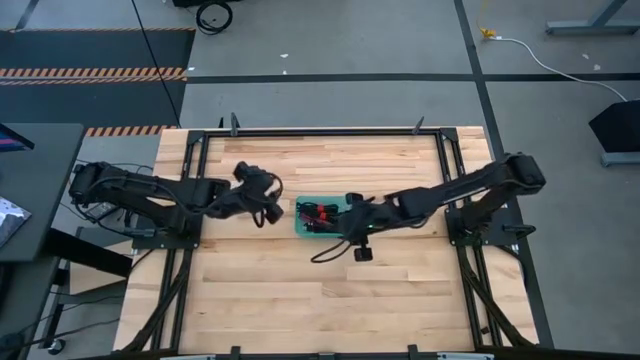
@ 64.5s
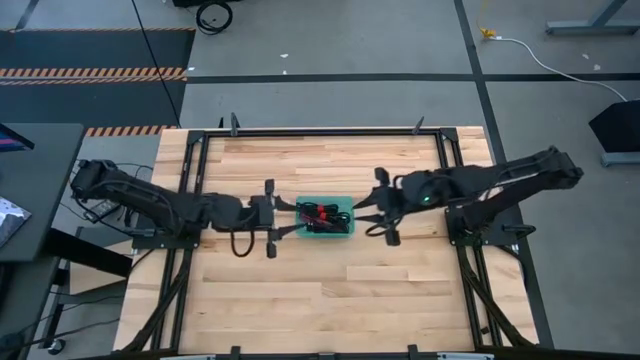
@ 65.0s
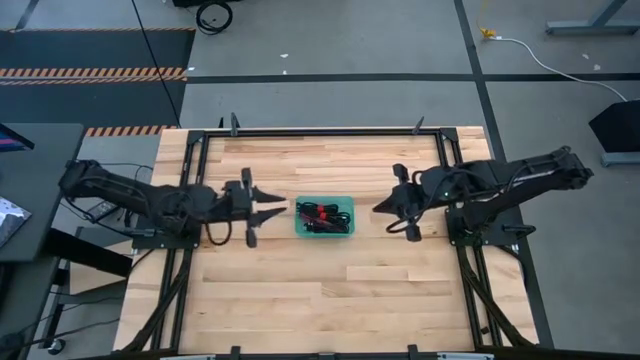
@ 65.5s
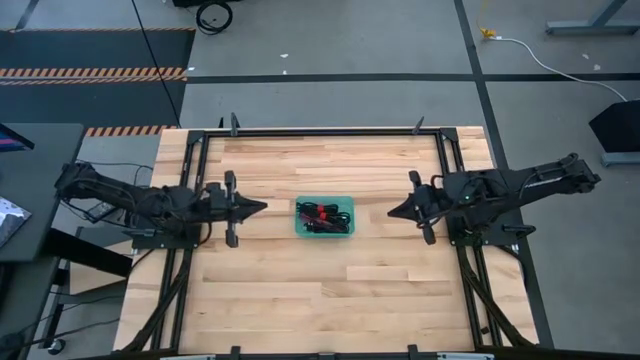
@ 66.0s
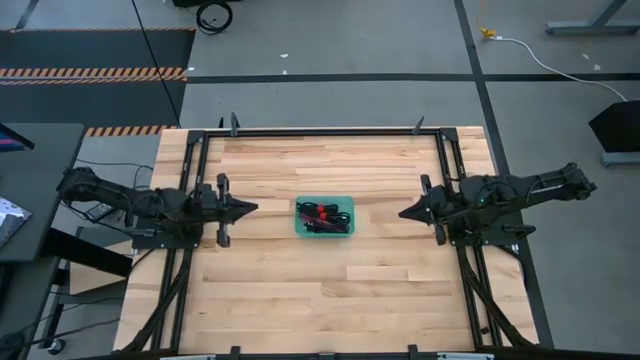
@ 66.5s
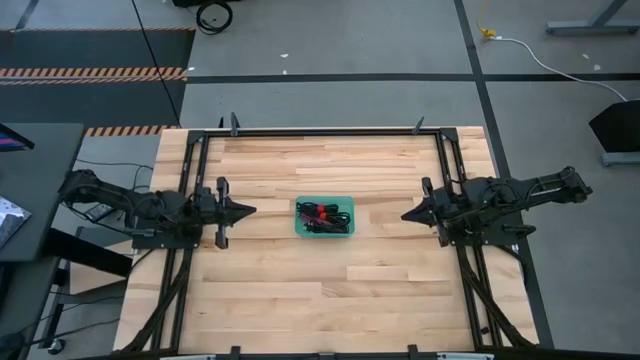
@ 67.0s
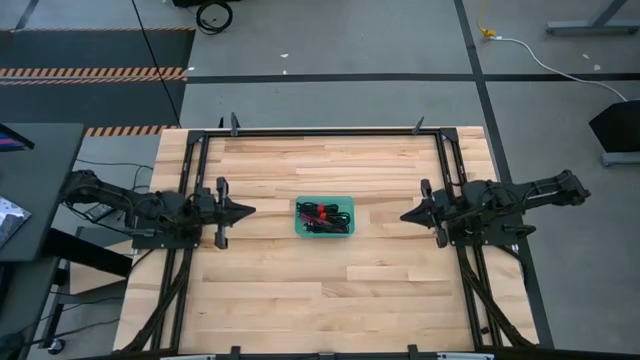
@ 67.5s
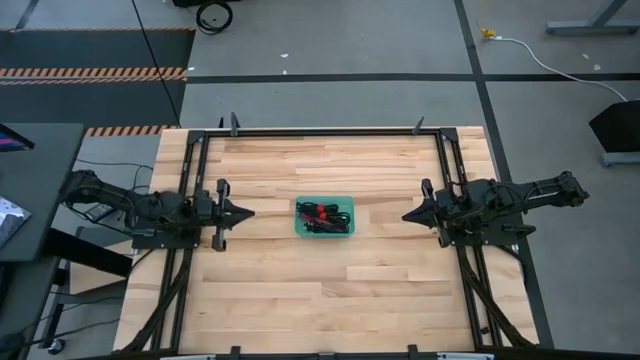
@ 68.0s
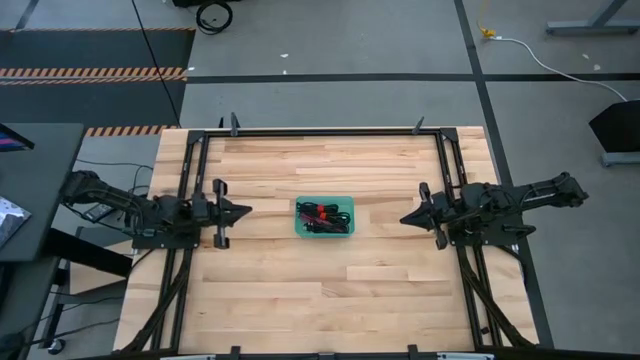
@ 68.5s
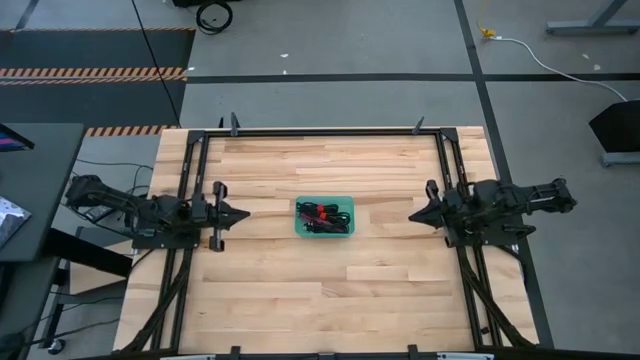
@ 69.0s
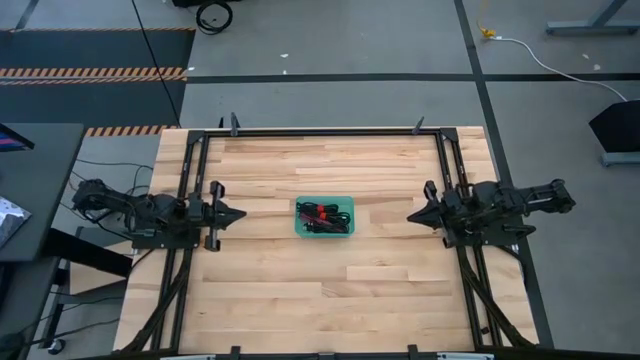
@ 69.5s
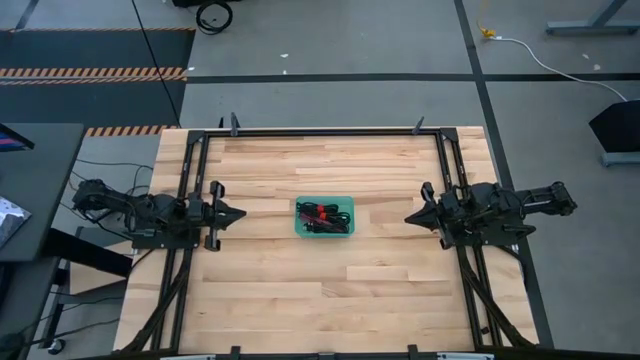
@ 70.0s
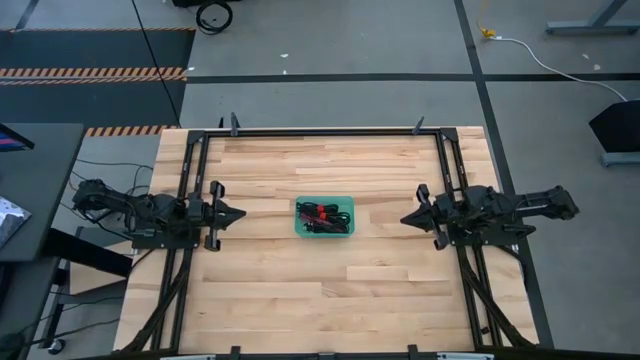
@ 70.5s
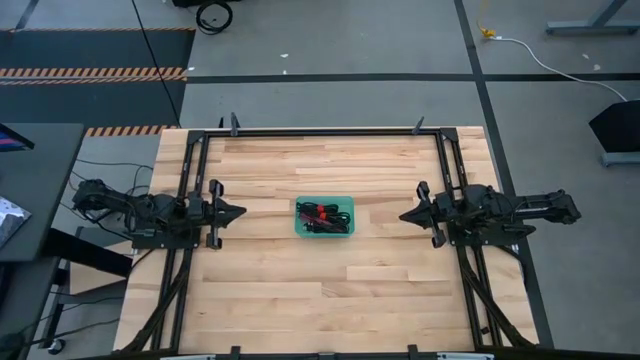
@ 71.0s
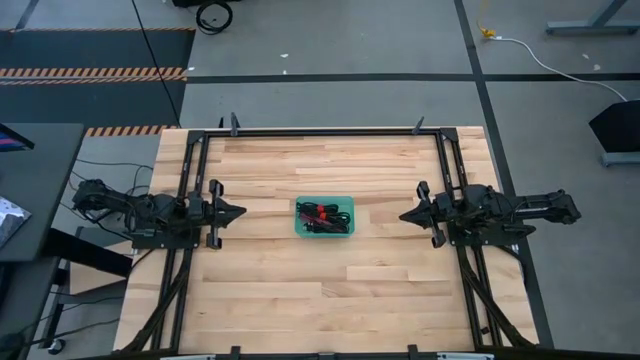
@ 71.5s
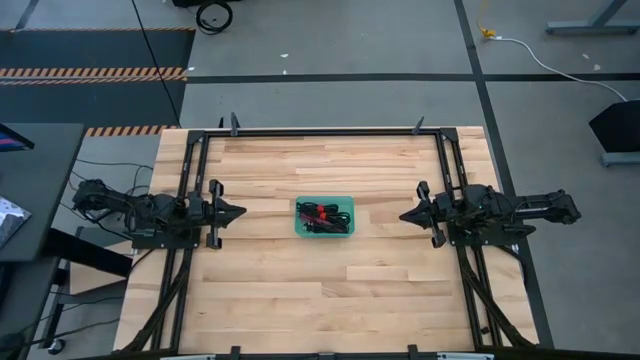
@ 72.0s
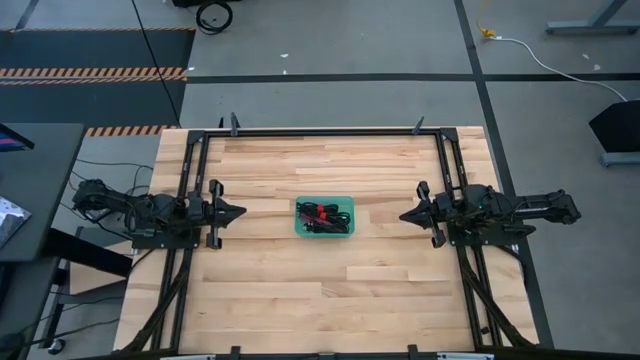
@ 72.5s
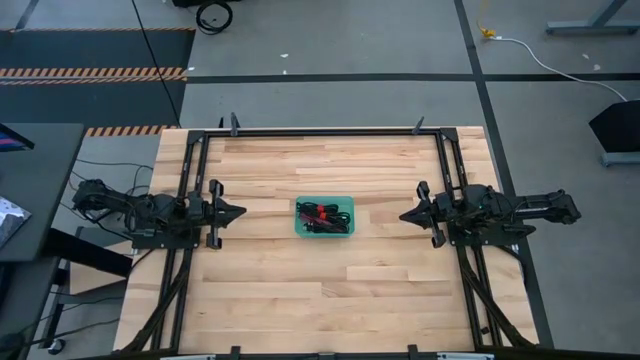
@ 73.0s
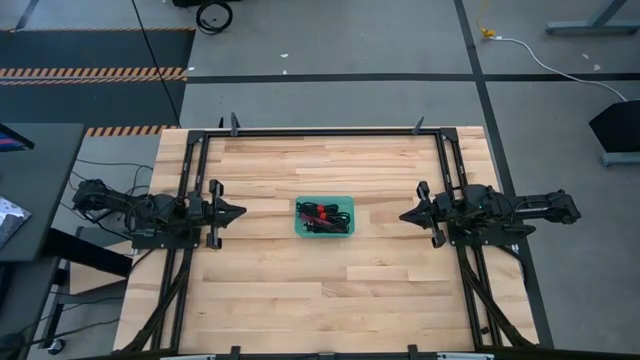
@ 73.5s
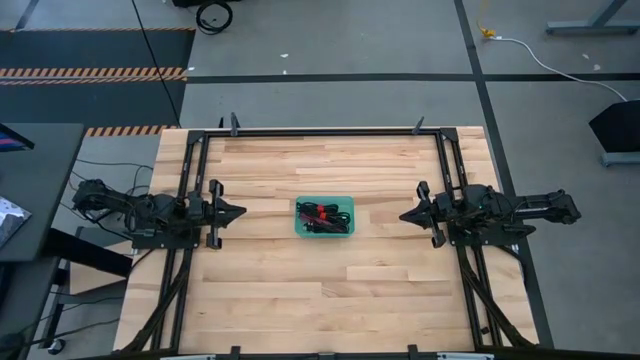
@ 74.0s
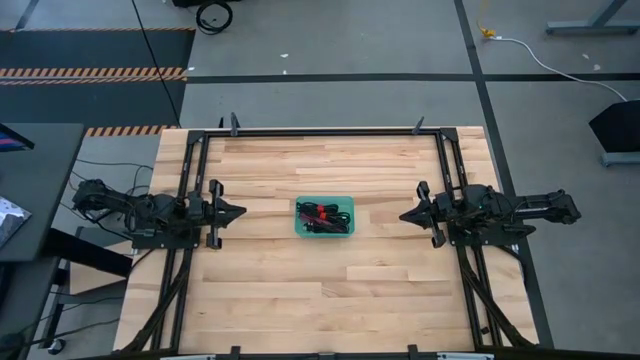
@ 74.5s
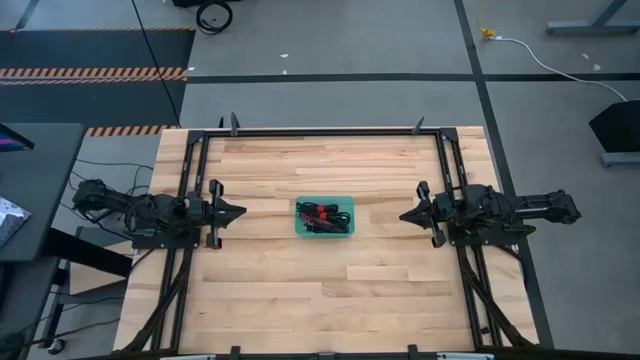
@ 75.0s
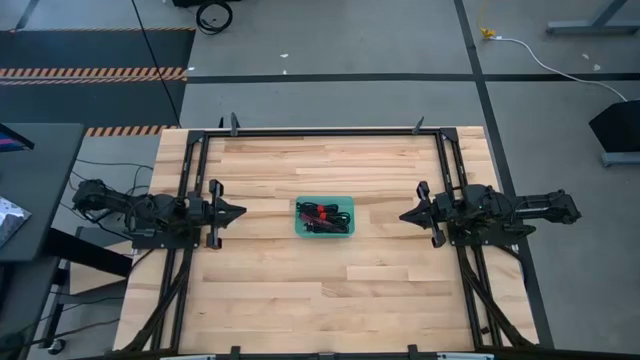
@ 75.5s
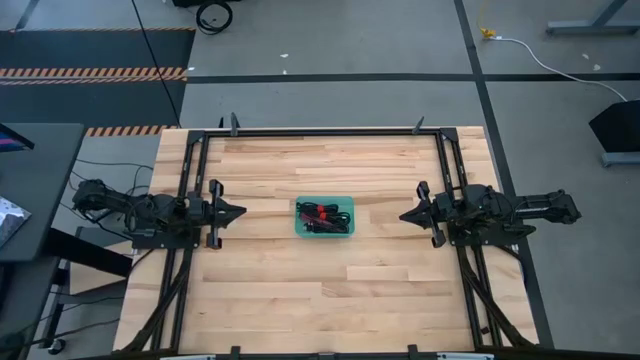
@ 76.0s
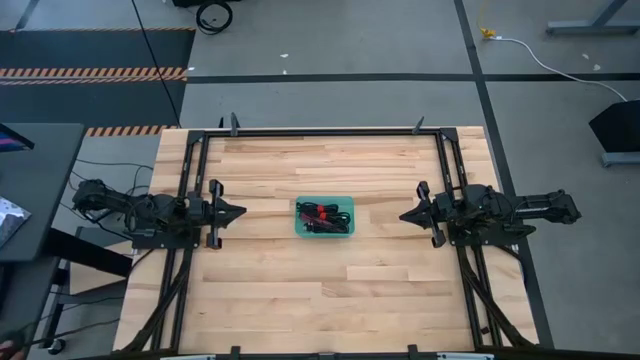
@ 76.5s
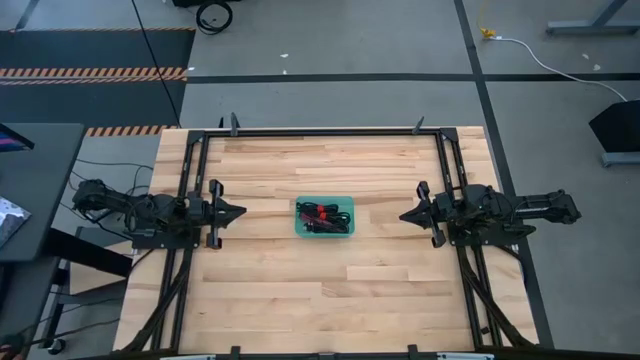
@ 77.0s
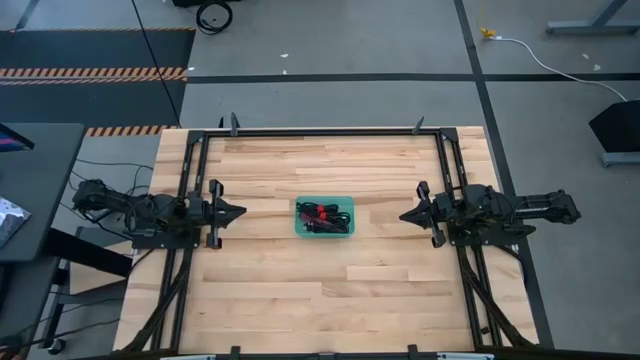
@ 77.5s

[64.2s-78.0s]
Task: Pick and place USB-C Cables
Return to Home Position

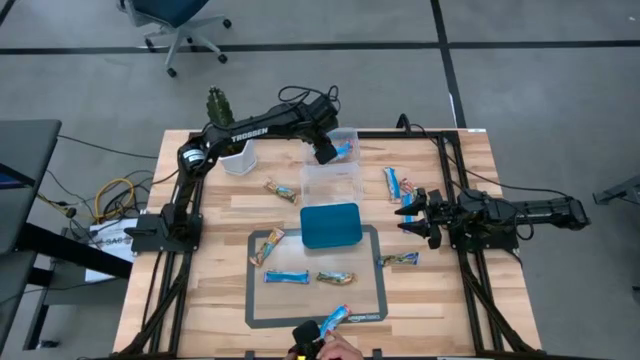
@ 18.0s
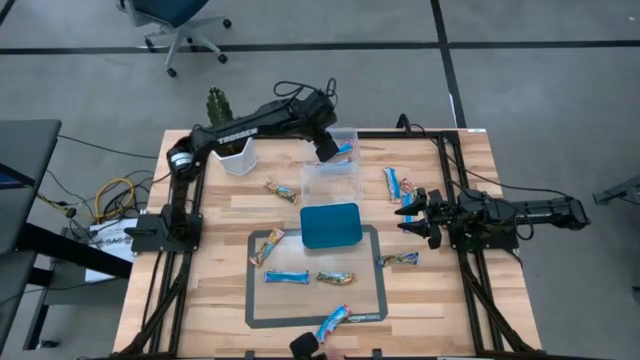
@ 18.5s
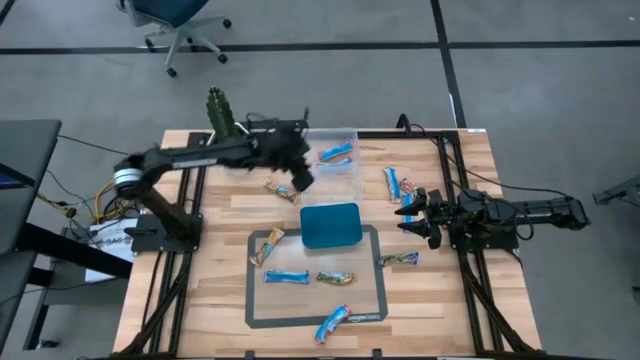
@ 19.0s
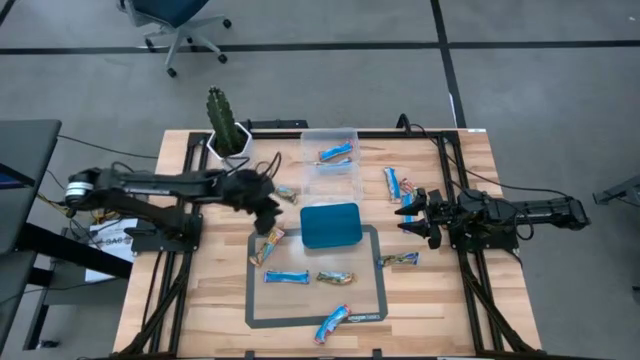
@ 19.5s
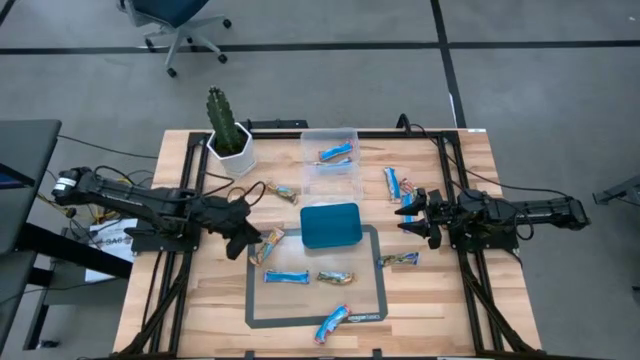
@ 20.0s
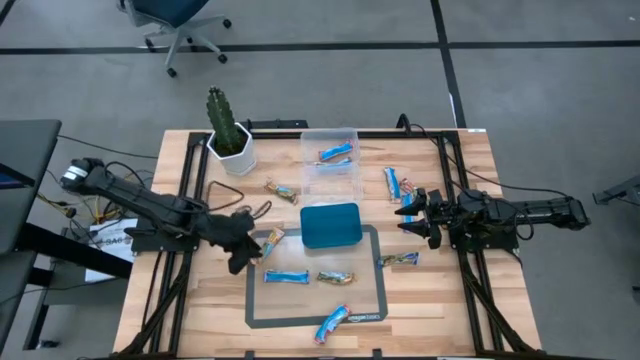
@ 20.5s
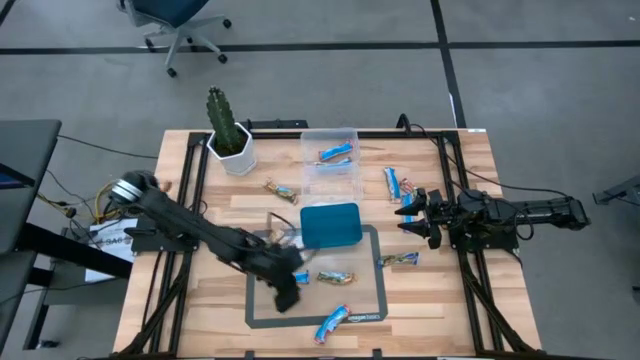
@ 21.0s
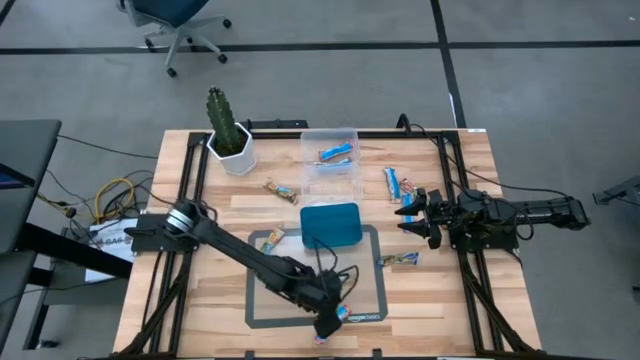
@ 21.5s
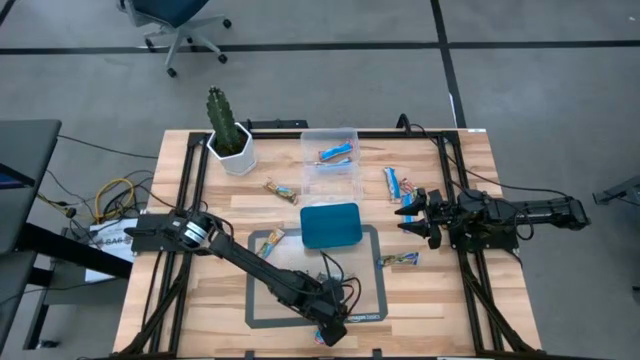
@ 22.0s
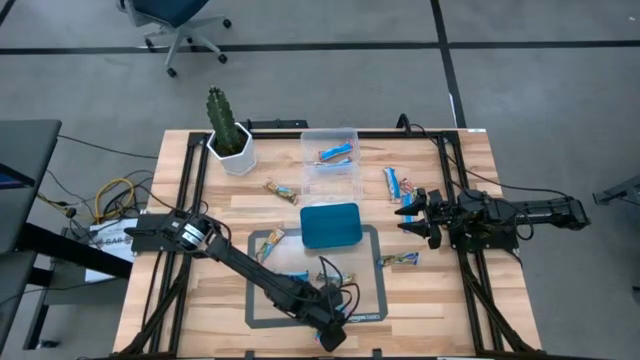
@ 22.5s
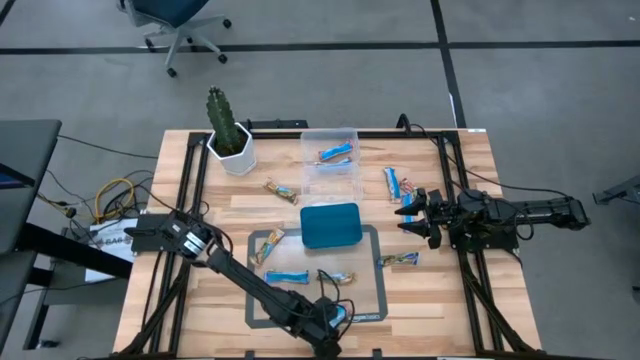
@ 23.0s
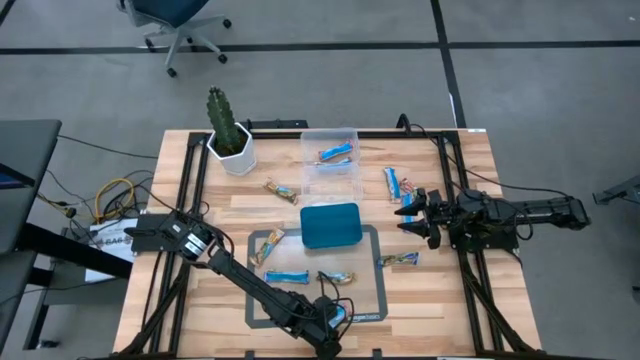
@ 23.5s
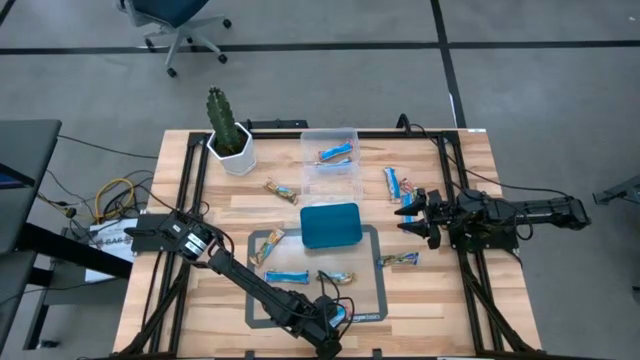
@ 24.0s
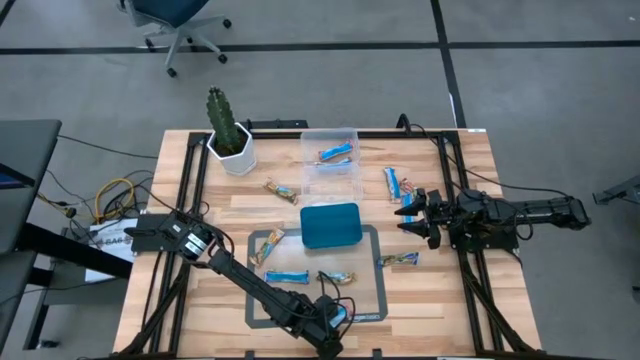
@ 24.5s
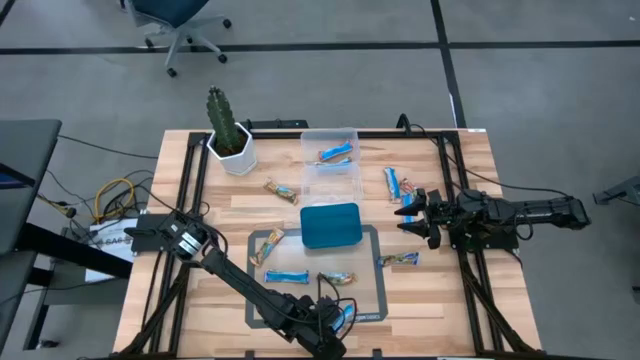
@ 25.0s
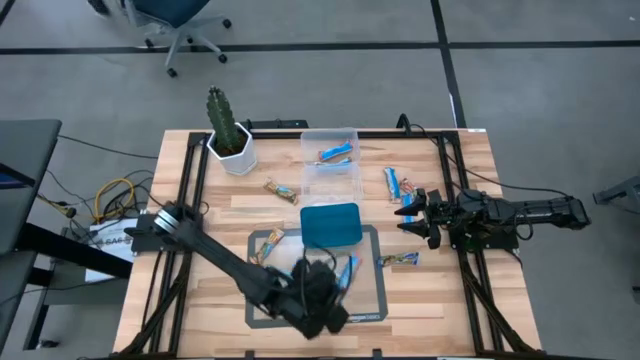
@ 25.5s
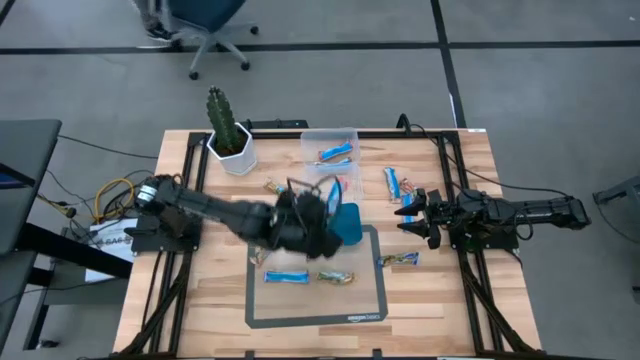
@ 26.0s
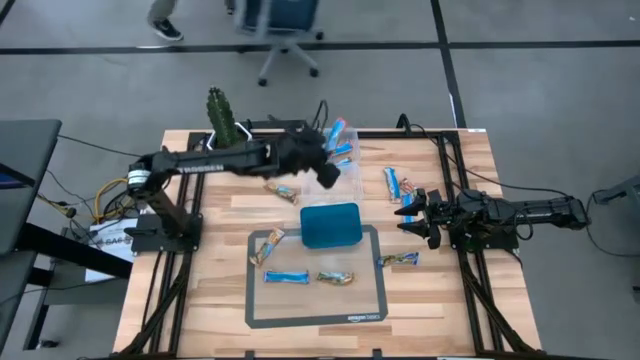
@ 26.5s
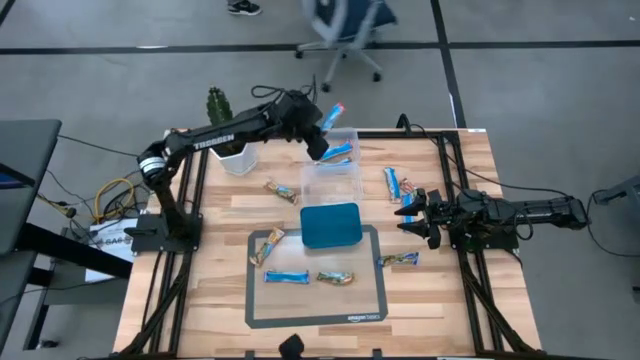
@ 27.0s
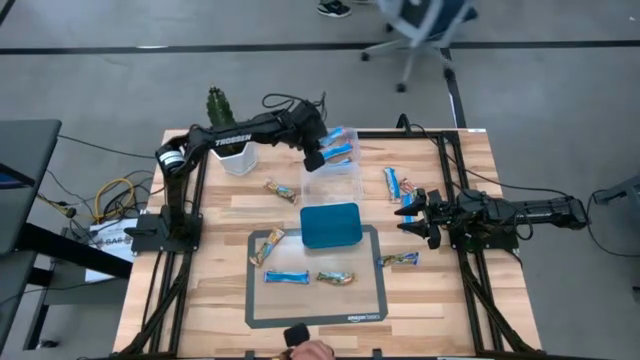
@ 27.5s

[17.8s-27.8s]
Task: Pick and place Granola Bars by type
Put the red granola bar into the top transparent bin
